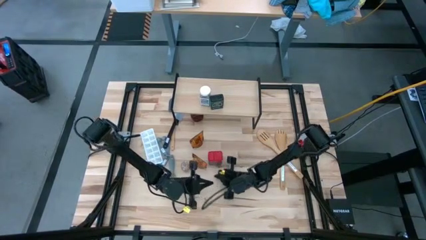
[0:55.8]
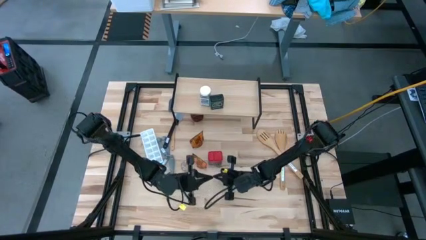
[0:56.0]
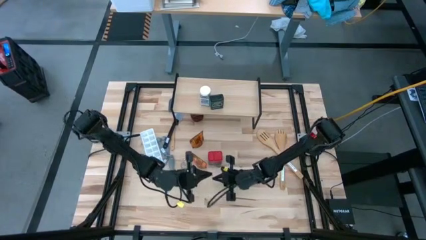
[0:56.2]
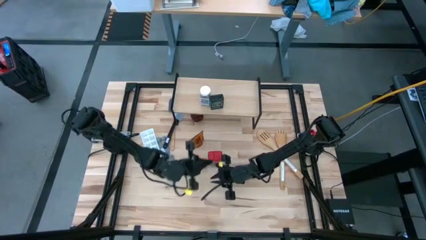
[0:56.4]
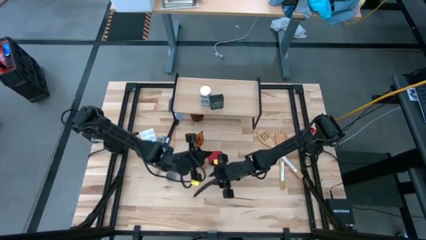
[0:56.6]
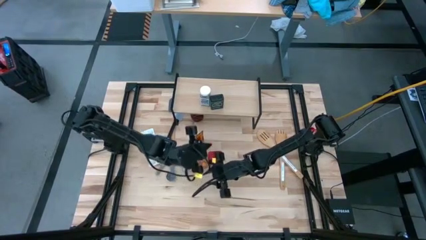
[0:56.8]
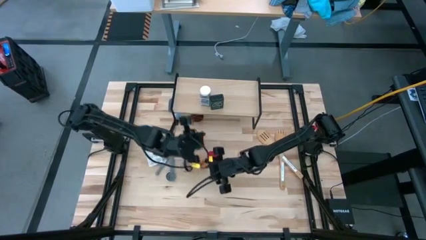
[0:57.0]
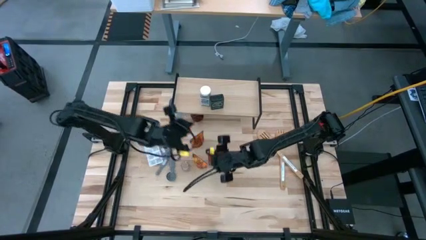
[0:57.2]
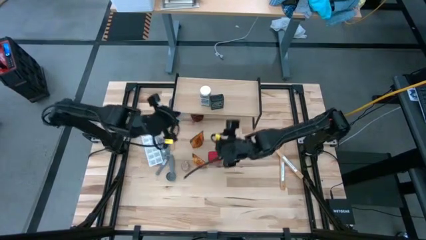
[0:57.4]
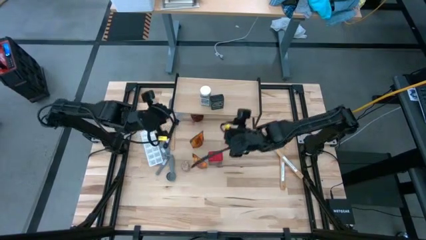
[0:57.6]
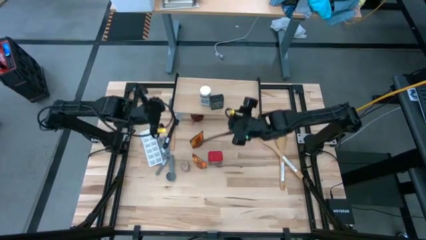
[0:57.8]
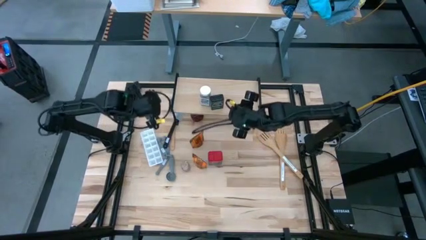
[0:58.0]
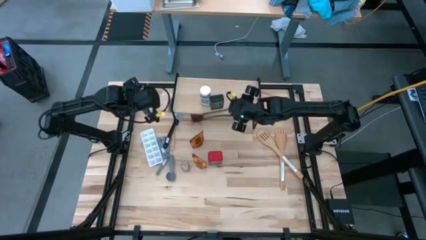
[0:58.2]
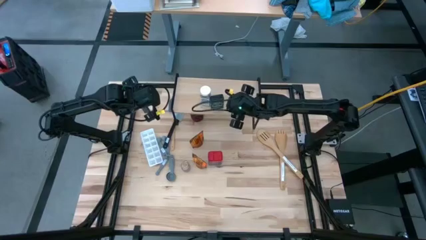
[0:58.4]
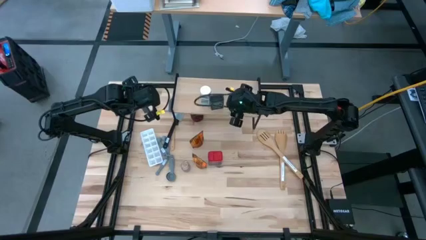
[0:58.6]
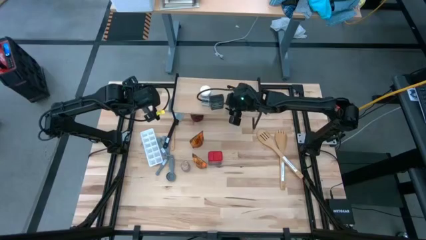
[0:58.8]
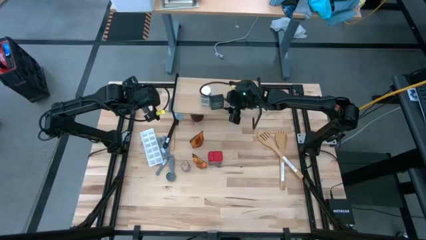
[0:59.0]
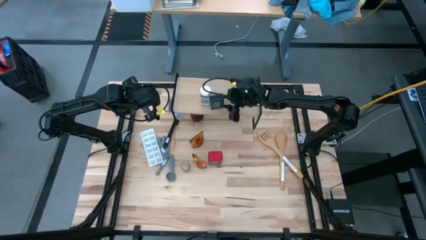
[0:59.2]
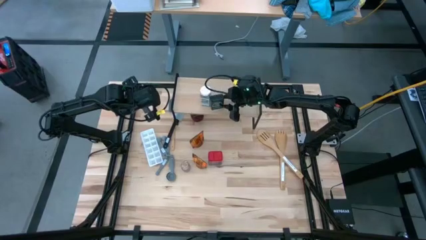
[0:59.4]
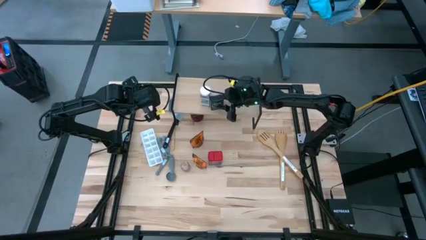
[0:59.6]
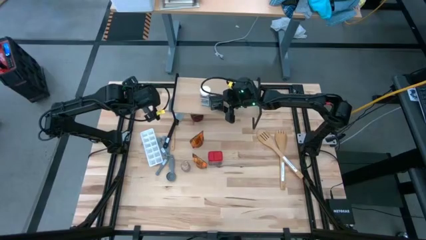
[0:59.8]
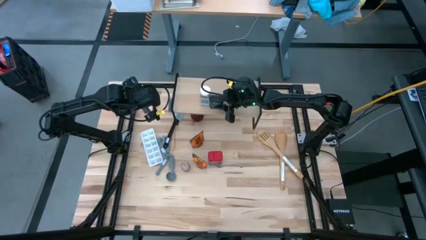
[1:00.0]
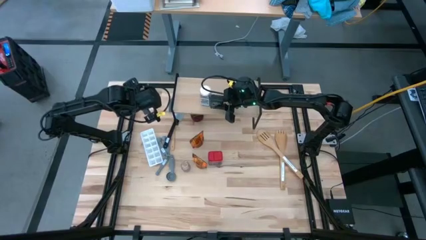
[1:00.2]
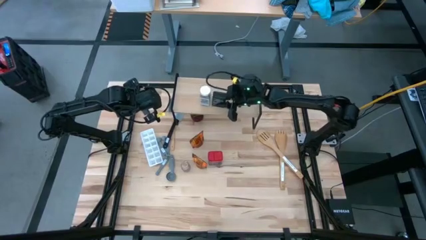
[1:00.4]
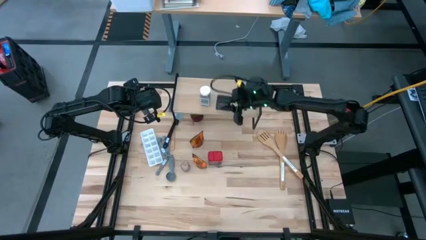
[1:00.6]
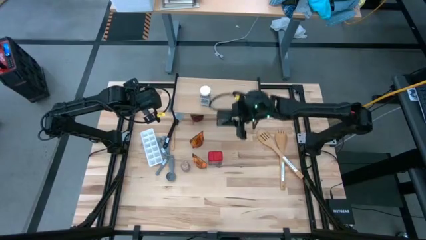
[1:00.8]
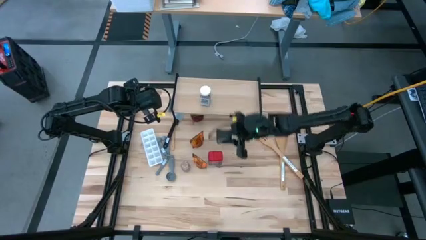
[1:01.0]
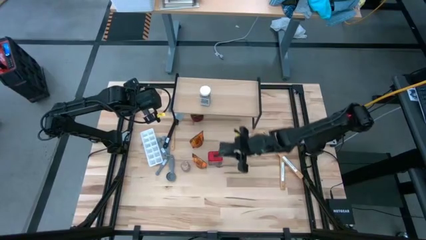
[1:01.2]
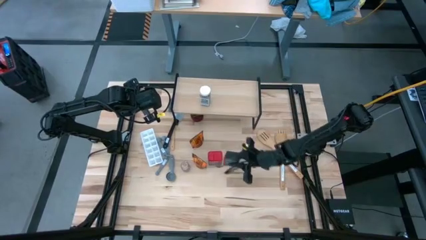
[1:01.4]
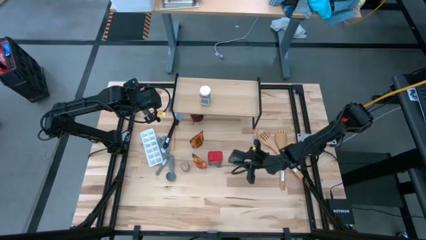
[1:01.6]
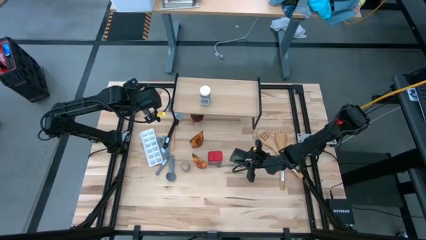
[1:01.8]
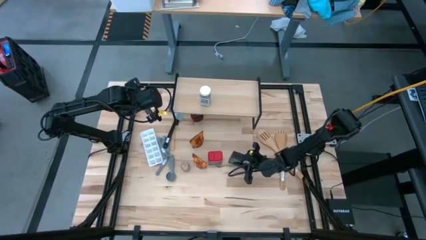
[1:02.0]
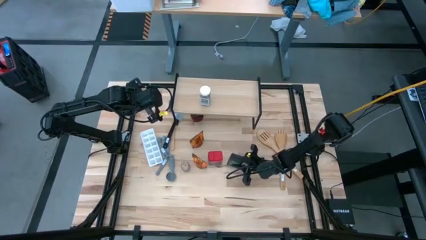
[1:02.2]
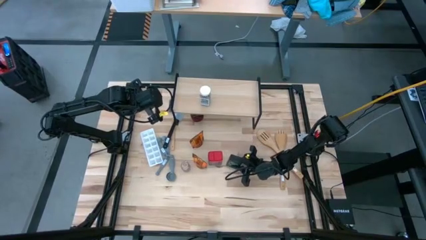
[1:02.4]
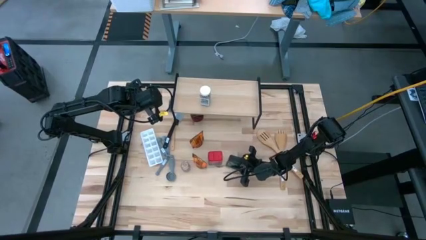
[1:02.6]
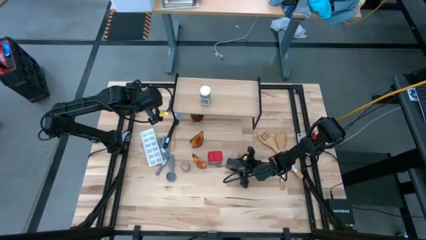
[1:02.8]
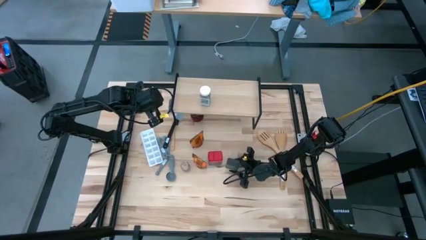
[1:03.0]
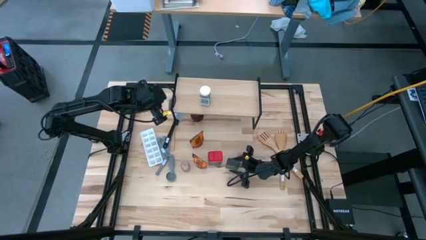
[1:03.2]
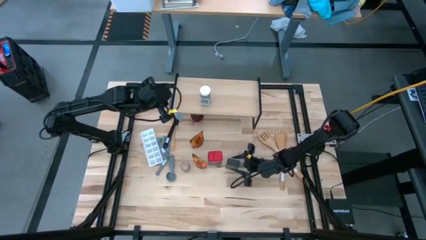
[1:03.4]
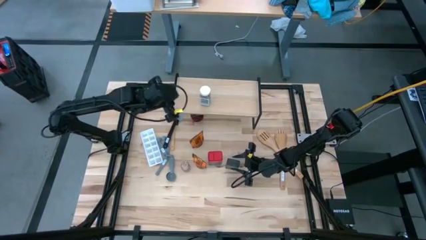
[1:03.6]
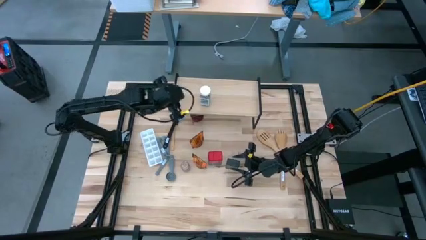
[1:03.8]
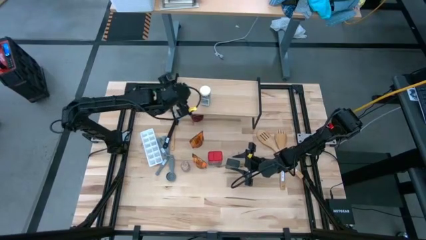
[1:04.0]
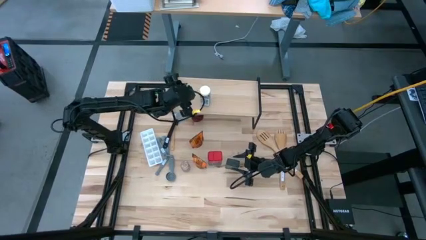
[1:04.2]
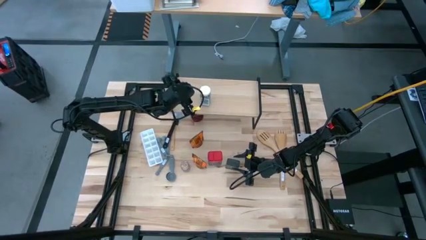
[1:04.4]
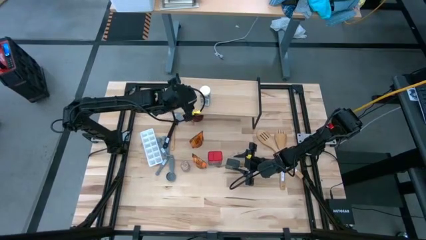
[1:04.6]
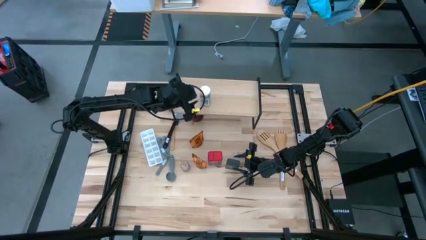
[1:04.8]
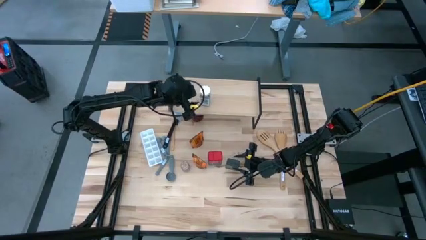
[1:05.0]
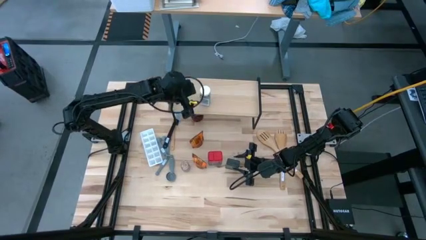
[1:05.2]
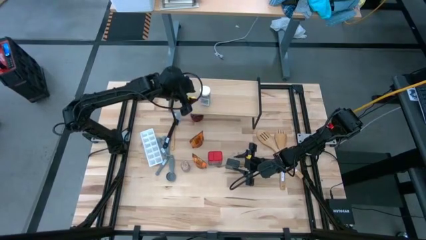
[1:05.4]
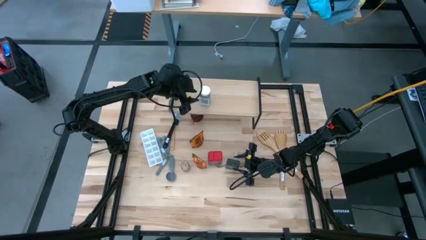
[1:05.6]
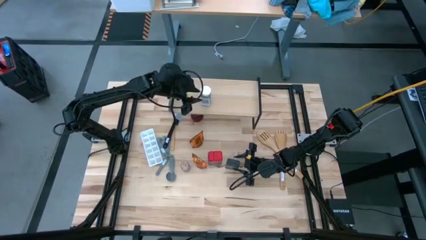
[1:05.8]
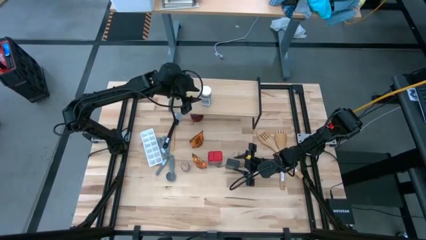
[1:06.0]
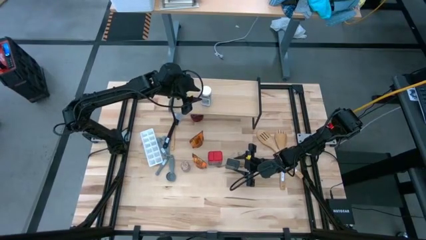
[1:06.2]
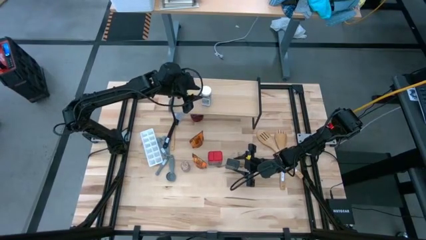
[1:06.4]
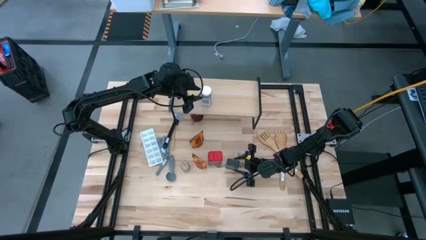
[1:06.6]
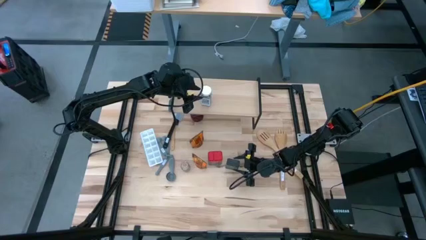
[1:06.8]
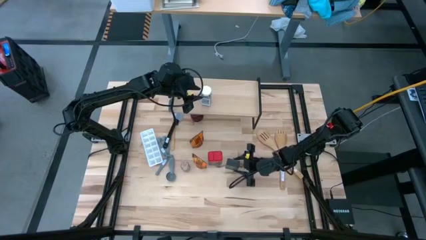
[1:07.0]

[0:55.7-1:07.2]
Task: Shelf spices
Remove the green seasoning can from the shelf

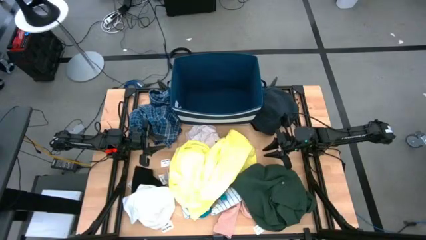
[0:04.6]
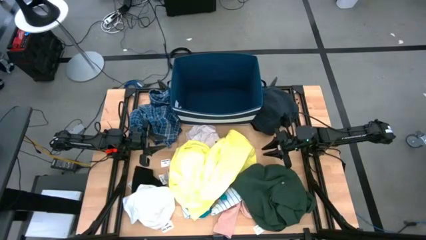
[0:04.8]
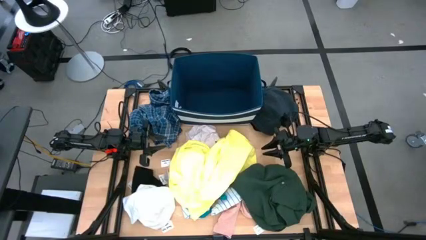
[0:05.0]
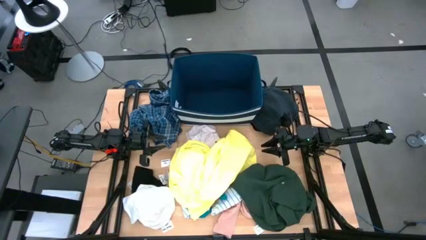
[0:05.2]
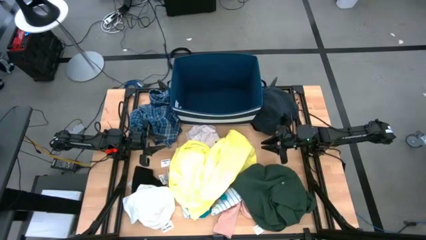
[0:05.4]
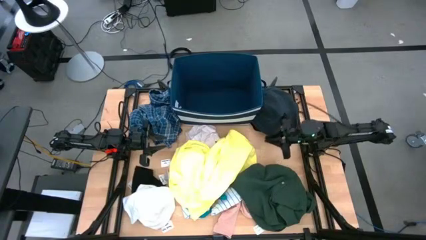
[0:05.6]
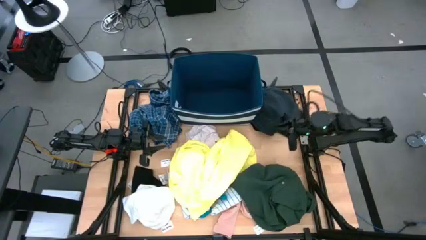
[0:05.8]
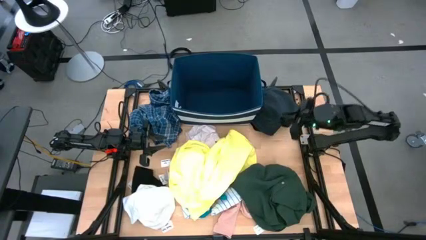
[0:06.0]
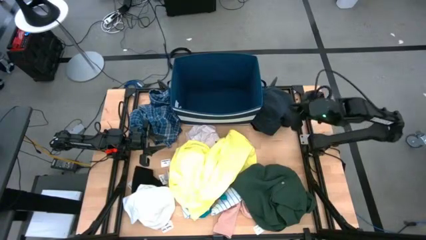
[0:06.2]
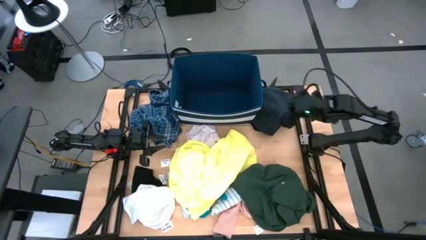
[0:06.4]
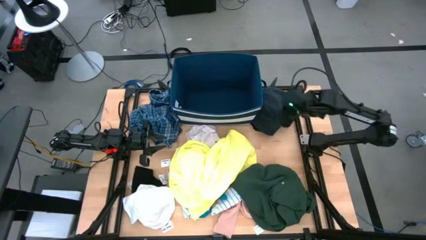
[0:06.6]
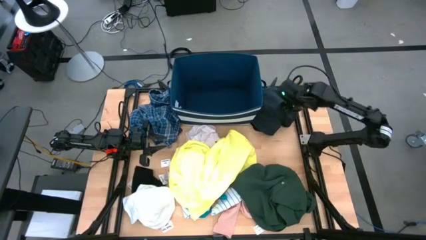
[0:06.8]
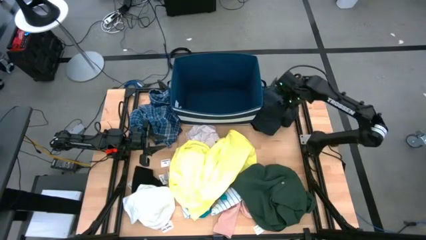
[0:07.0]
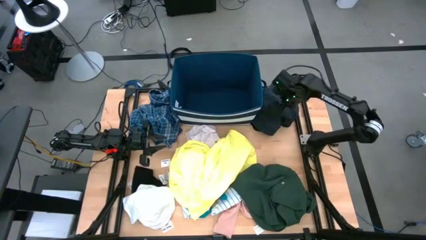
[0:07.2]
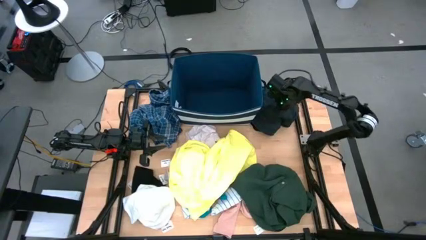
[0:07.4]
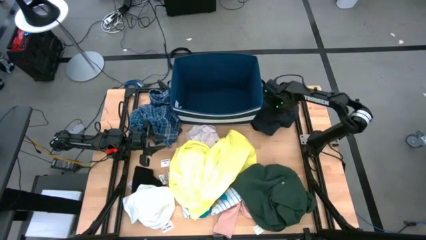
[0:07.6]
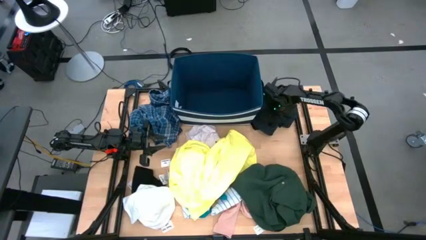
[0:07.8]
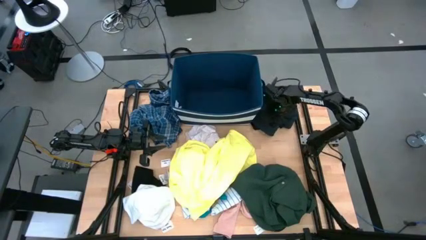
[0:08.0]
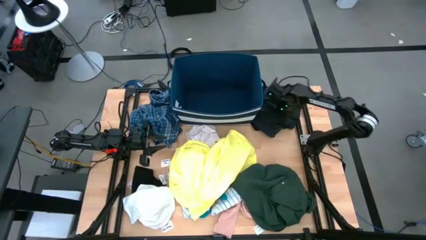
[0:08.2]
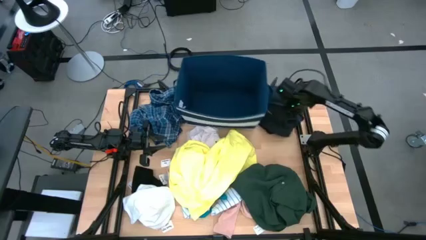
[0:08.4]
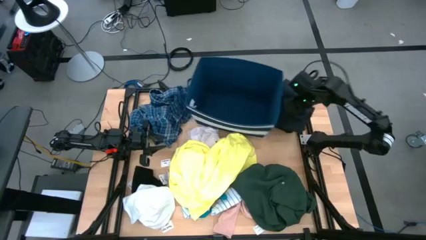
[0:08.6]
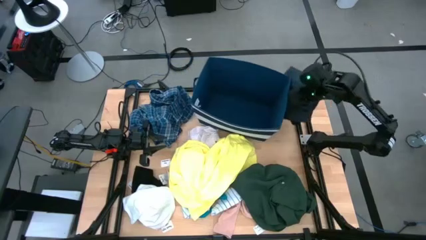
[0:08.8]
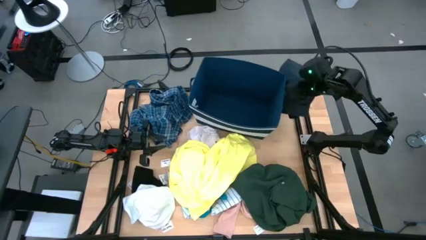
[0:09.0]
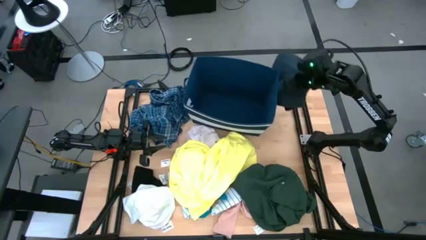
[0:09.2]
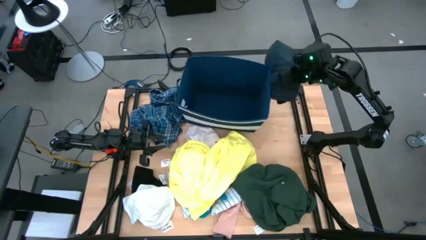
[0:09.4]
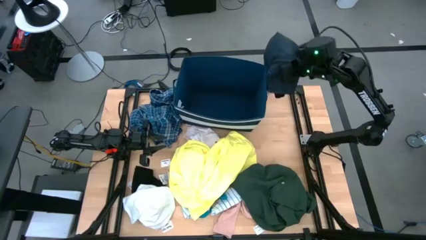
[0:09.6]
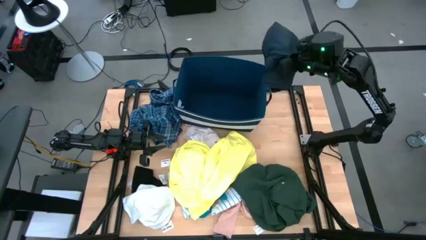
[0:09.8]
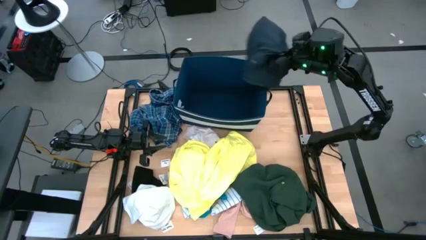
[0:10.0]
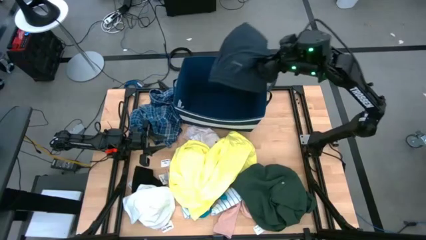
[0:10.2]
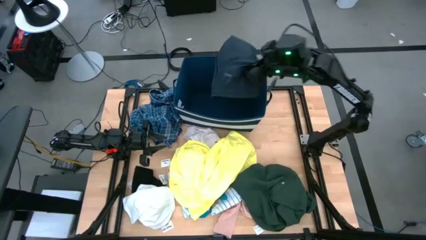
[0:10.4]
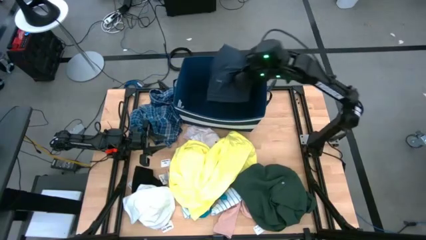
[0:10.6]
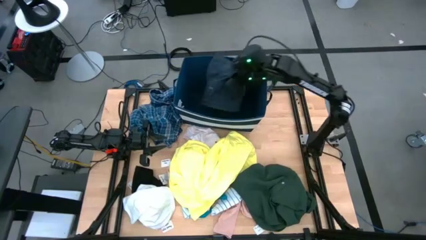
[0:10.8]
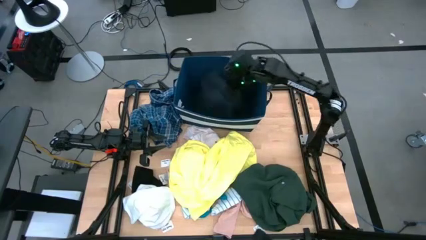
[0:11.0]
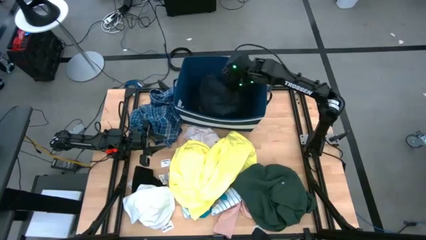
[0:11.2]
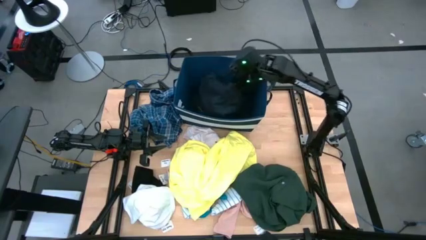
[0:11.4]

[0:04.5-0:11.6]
Task: Sort clothes
Put the black shorts into the blue laundry bin
